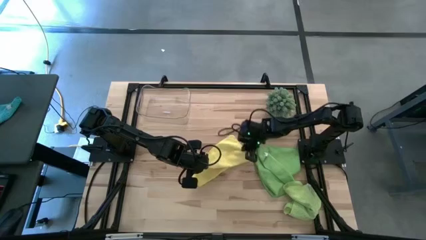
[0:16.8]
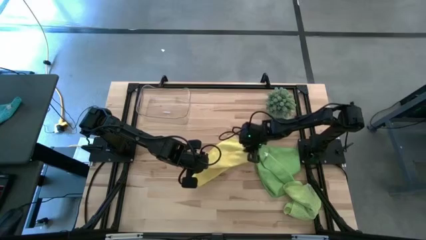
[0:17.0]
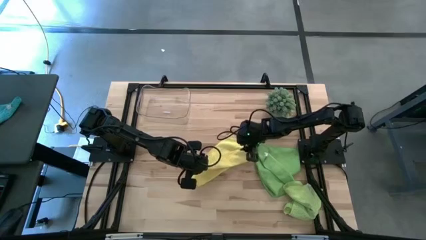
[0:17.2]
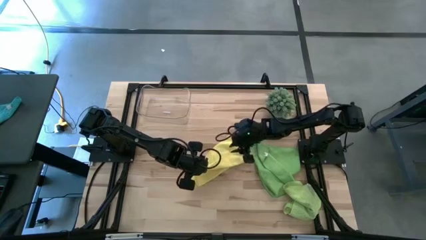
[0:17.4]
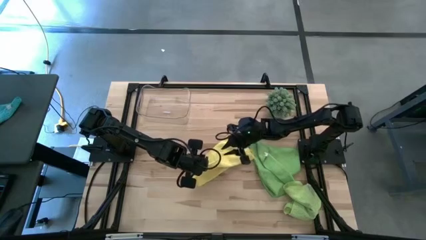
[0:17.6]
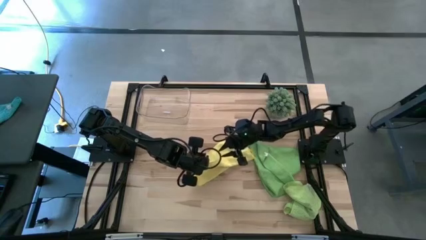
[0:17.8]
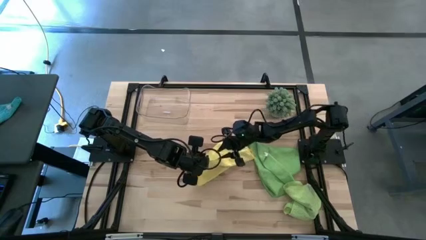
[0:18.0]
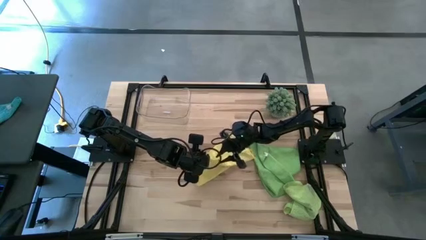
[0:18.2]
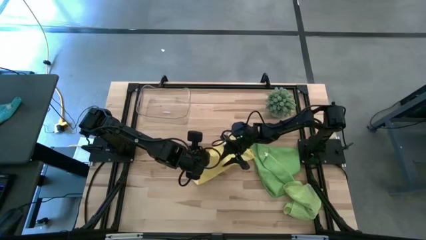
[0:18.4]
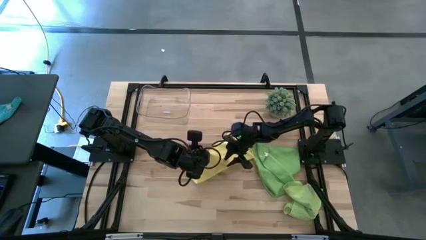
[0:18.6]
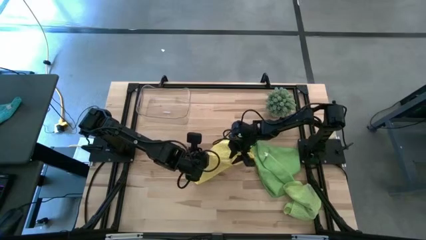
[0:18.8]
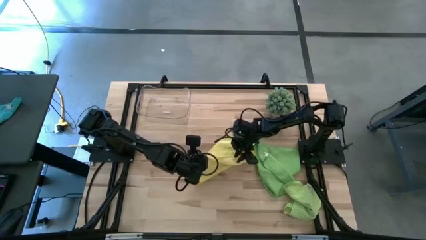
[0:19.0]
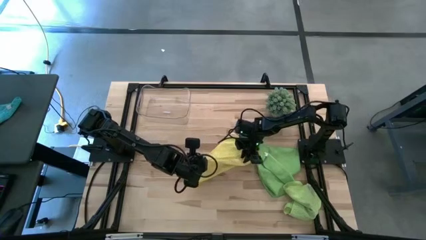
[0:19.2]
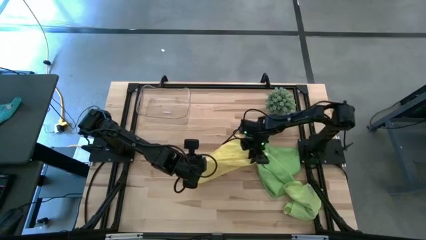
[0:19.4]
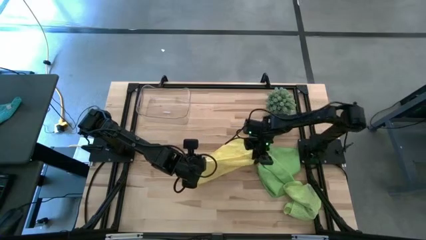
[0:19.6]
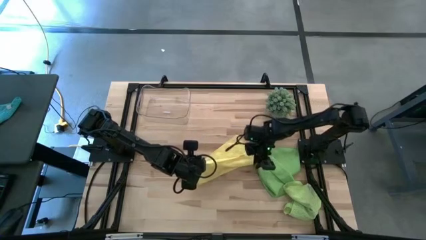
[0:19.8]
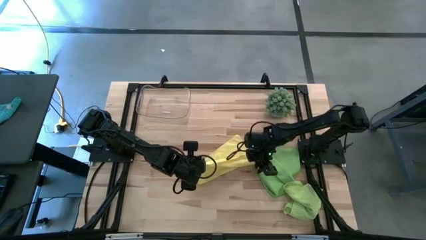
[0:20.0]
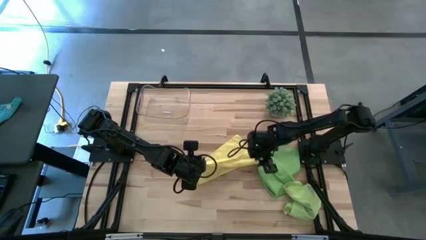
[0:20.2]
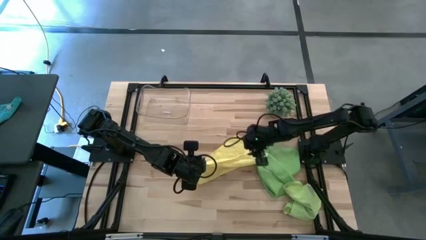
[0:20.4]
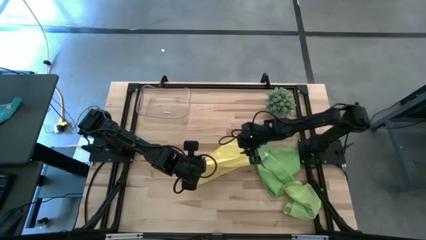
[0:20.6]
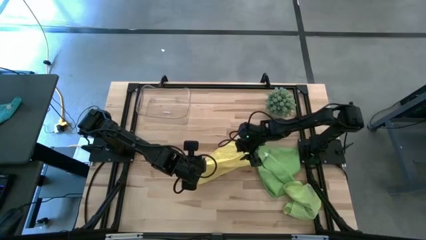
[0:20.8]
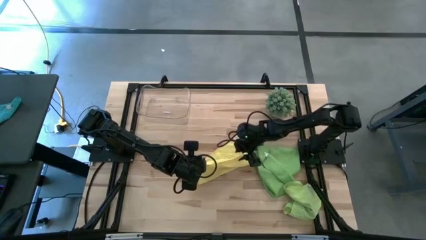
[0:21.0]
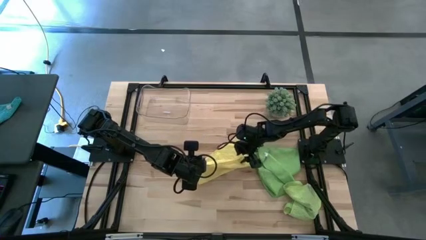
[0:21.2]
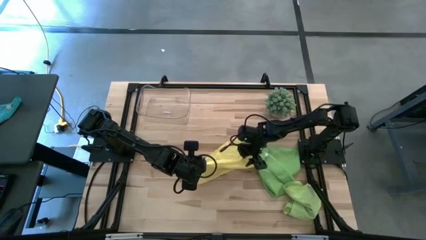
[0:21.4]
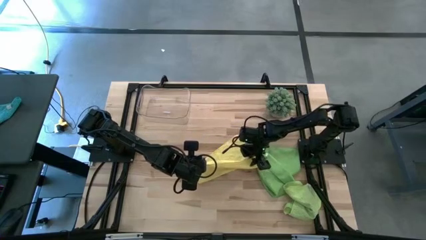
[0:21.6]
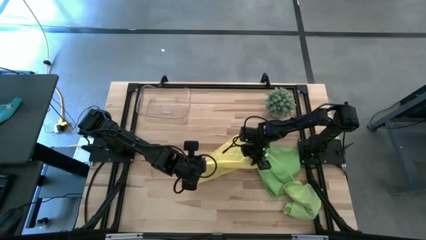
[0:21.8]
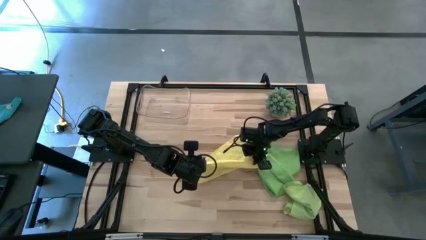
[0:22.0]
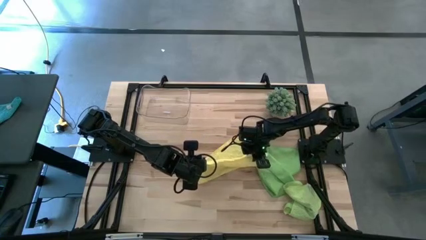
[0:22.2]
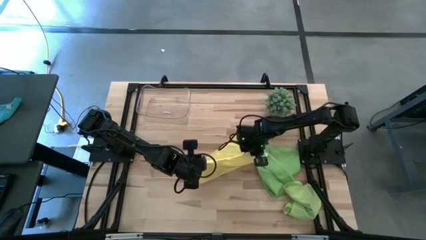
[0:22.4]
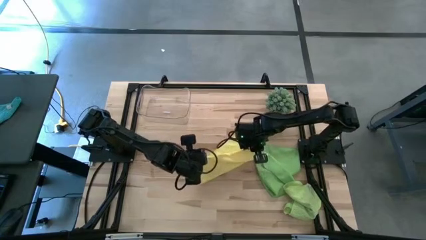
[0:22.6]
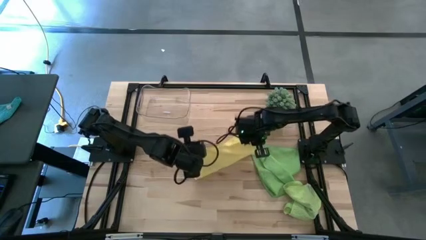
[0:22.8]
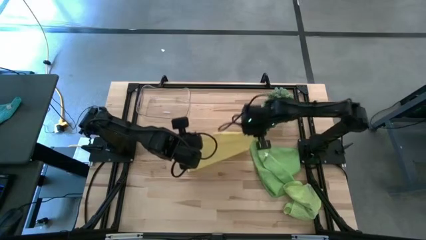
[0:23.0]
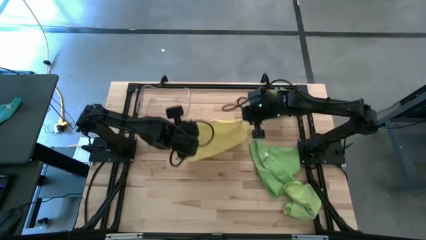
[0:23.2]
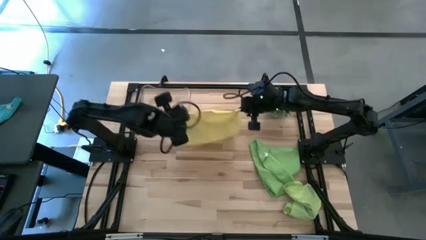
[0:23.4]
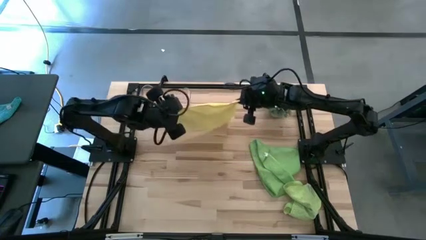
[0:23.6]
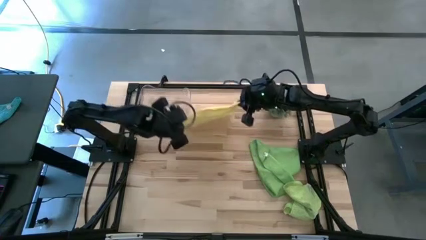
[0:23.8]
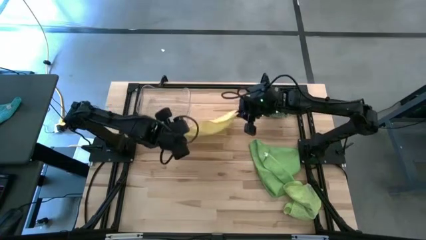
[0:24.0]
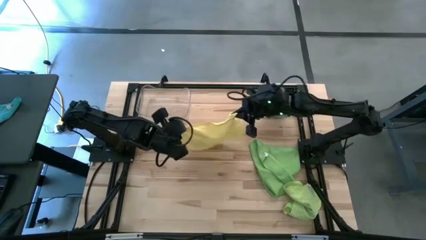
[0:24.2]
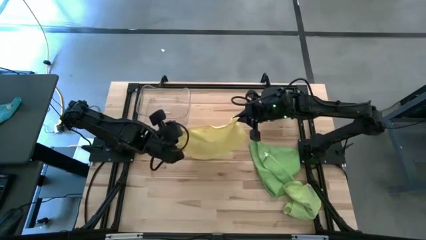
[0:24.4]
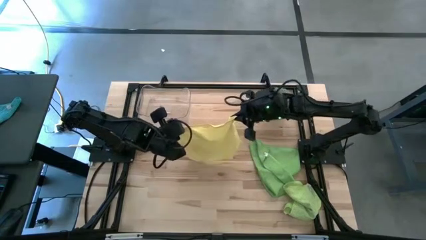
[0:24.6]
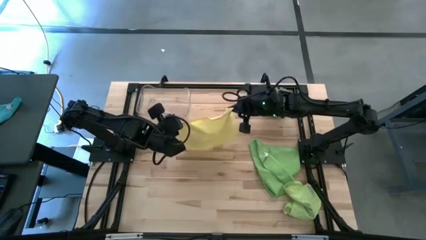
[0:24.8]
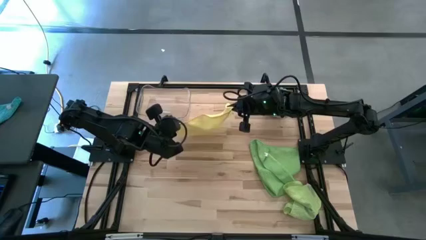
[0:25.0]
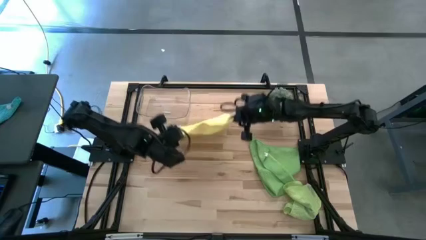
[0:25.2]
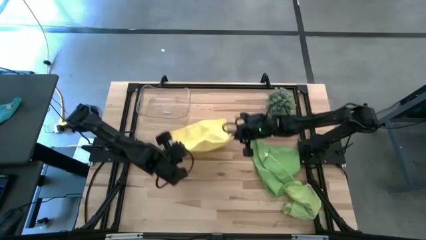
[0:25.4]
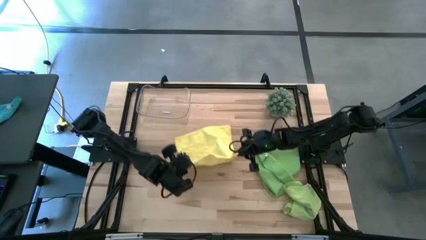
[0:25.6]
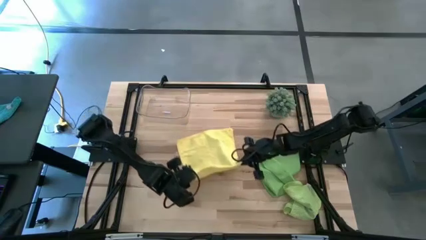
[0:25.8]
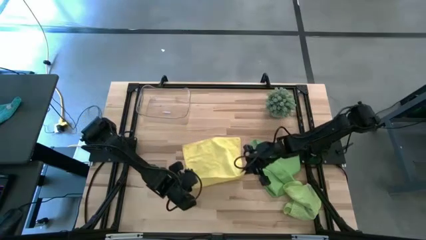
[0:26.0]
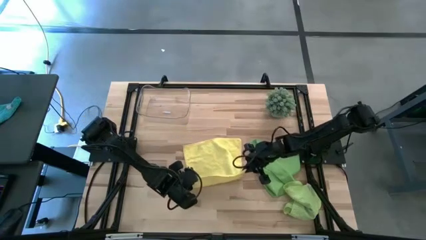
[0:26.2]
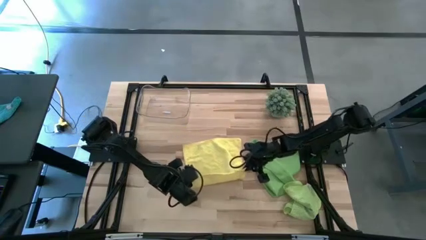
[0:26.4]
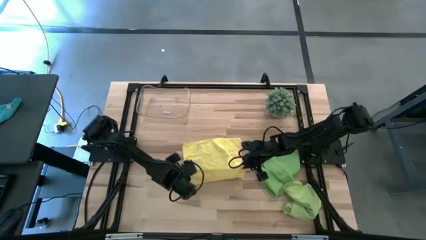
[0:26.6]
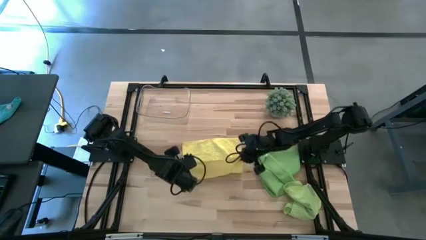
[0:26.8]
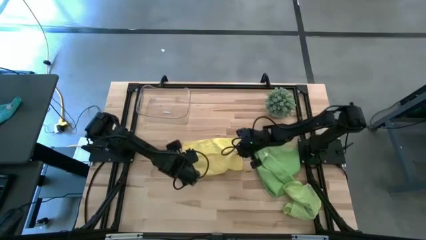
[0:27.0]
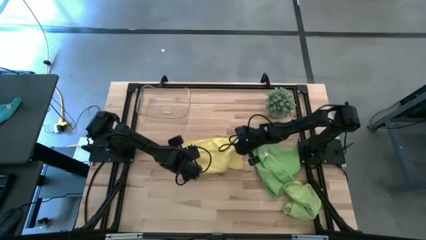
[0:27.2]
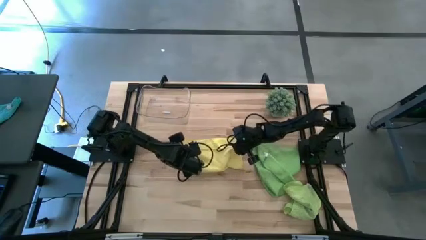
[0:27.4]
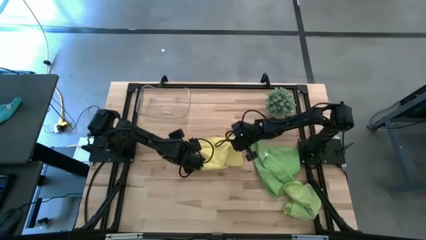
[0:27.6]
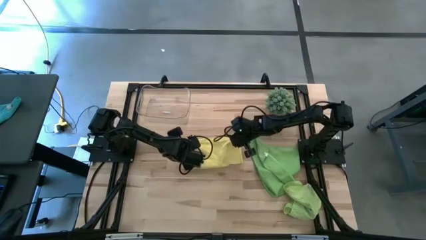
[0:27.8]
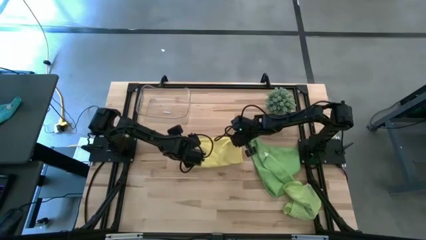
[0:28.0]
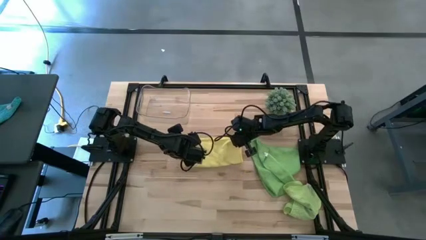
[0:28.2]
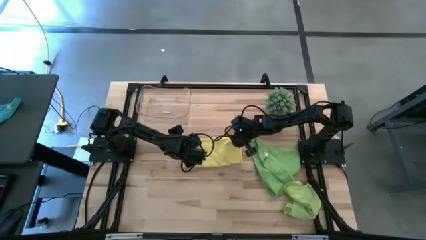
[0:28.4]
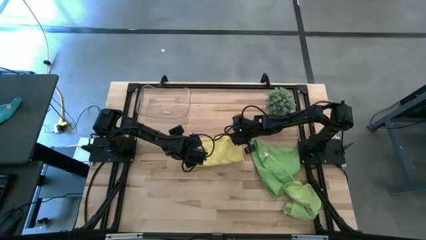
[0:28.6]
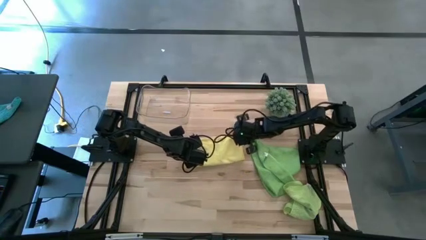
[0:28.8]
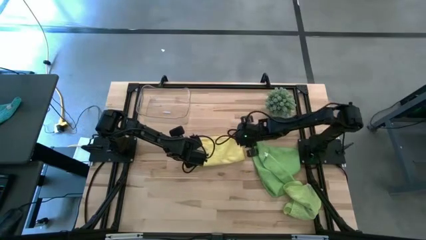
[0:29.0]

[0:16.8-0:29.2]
Task: Roll microfiber towels into tight, uniform cylinder then place into a basket
Fold the yellow microfiber cloth

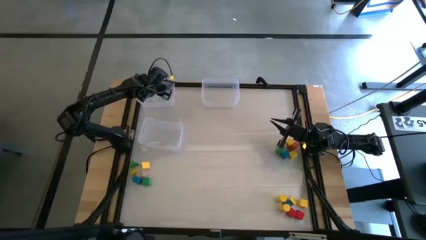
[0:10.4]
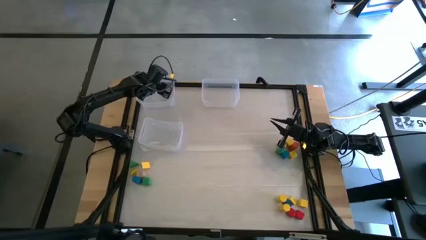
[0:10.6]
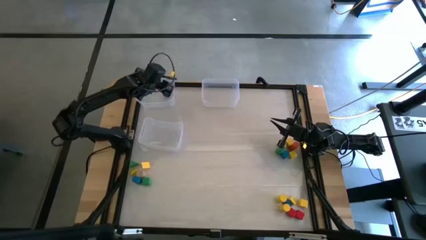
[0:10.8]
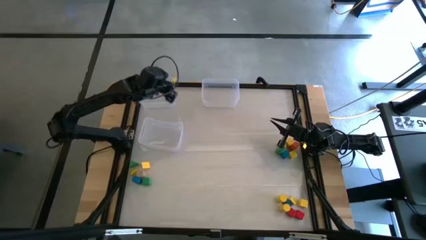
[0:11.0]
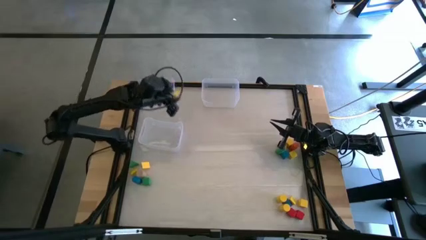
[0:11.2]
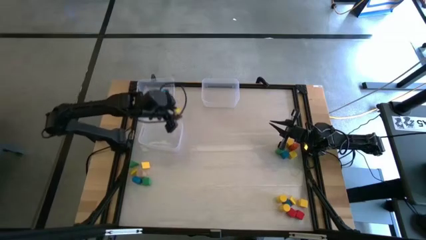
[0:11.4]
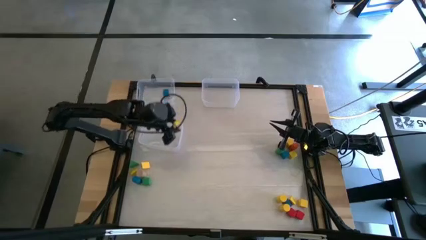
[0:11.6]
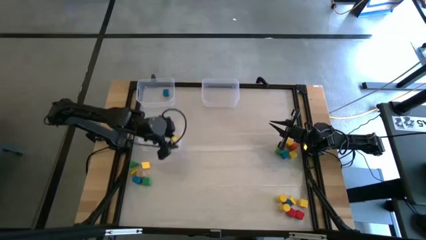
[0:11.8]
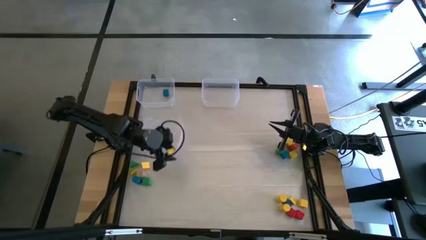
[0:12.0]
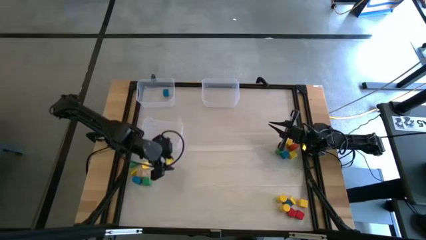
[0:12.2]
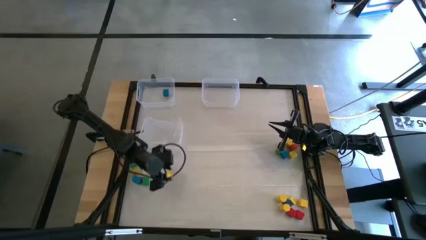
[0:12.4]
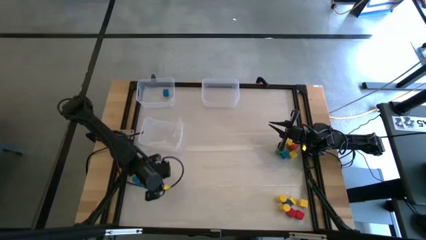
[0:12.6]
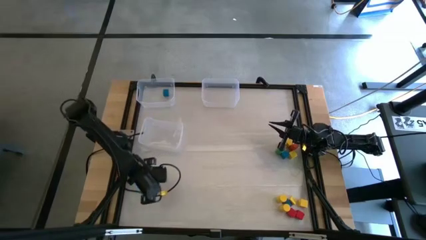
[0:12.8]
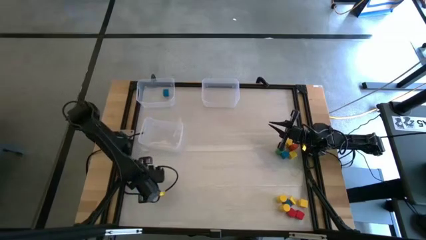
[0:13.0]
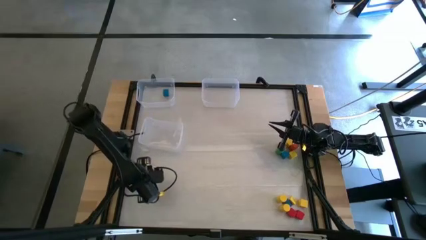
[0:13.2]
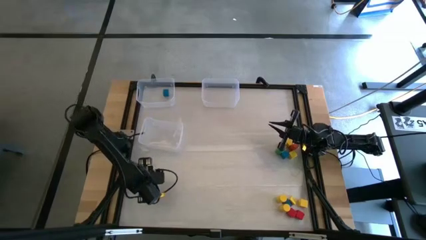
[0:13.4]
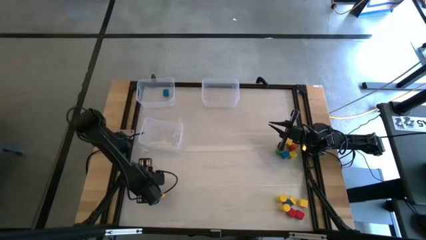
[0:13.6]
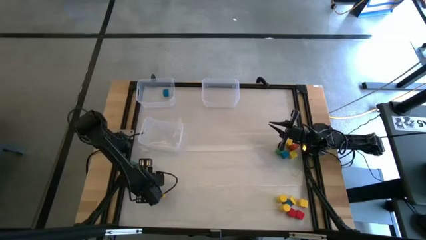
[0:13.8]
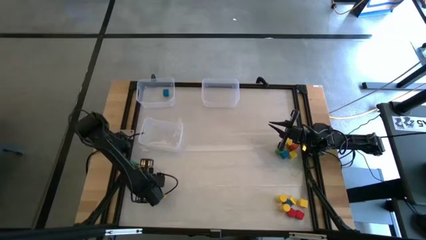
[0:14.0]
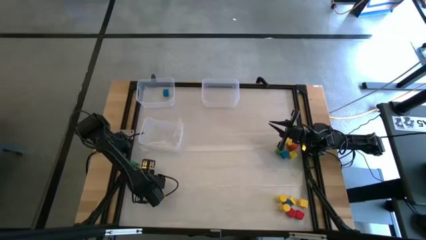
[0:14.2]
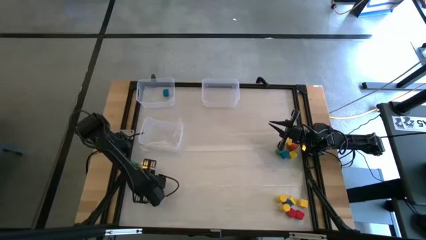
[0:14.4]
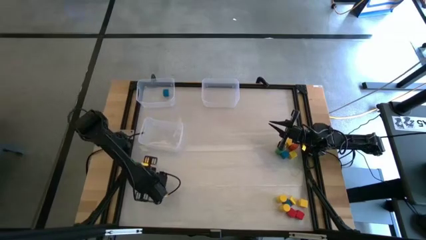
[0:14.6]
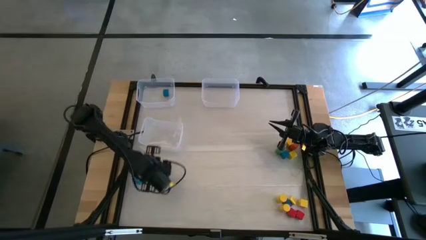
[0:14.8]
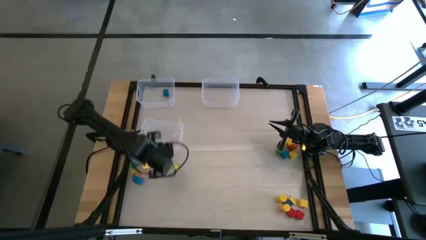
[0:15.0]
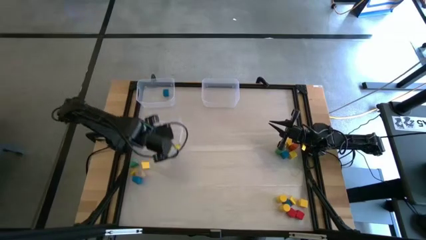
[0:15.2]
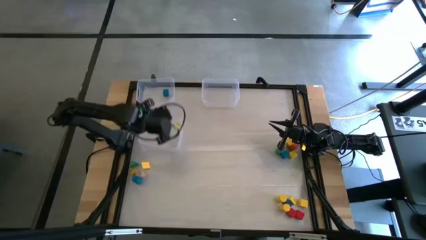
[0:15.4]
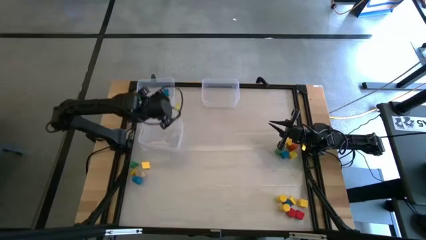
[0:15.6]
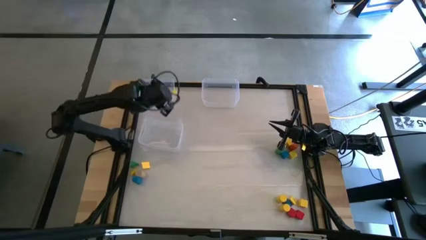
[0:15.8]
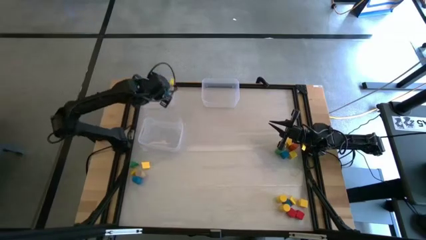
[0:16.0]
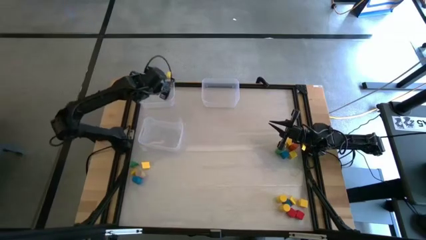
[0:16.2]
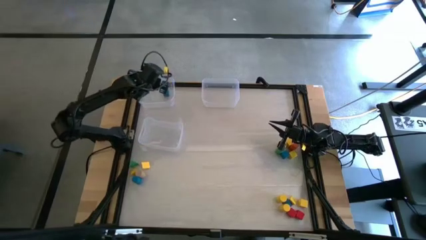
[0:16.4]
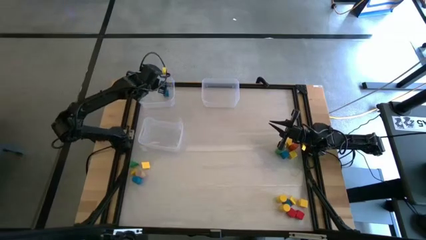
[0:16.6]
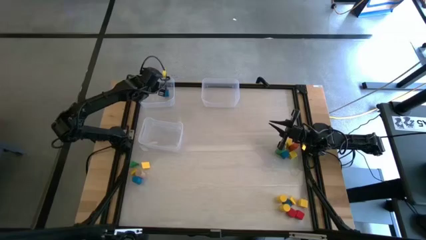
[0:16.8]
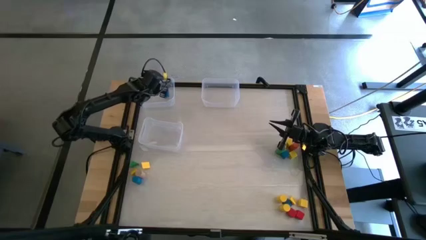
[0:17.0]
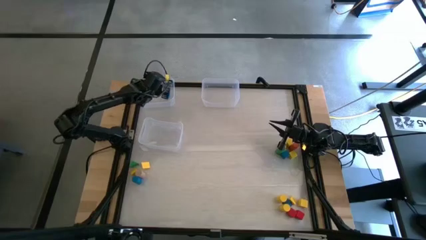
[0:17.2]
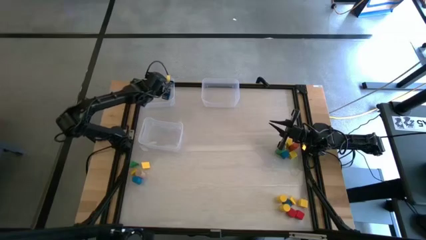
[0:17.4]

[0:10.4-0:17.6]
Task: Sort blocks by size
Put the green square game block into the top left transparent bin
